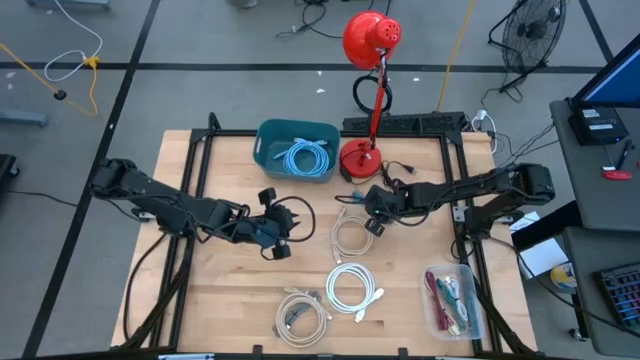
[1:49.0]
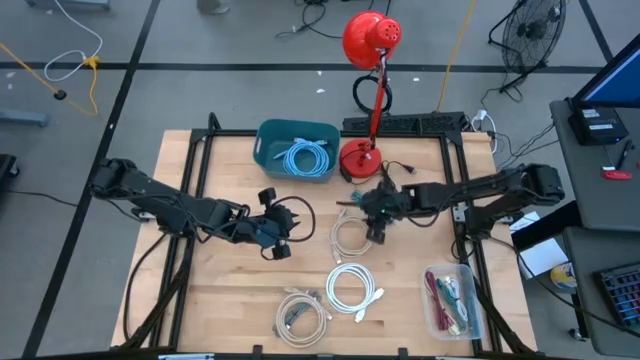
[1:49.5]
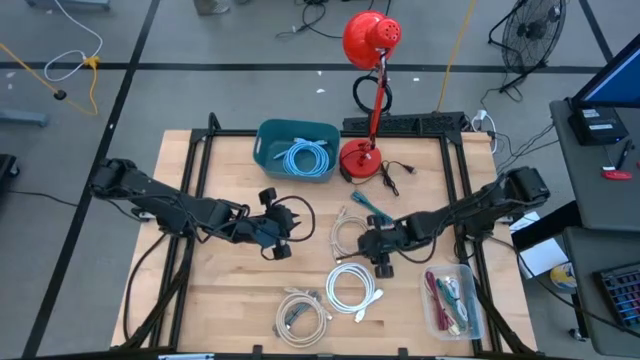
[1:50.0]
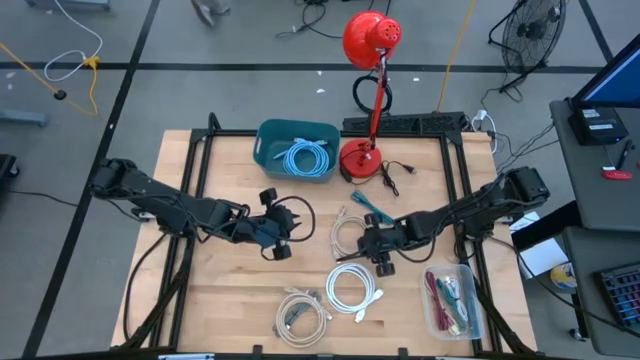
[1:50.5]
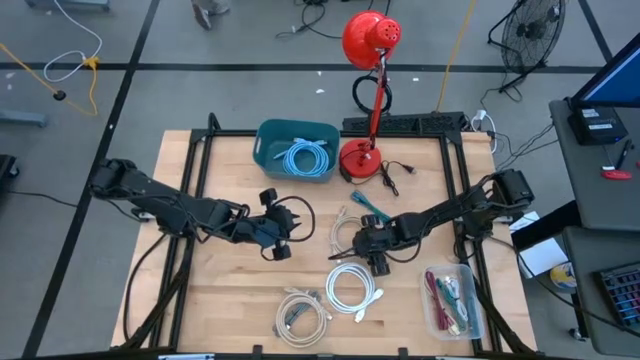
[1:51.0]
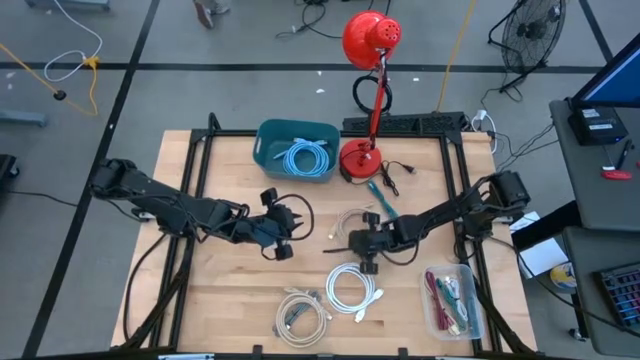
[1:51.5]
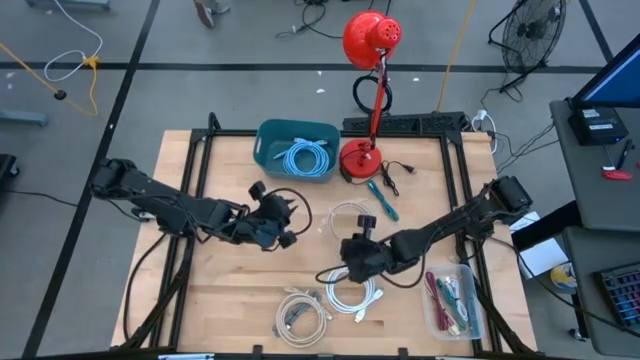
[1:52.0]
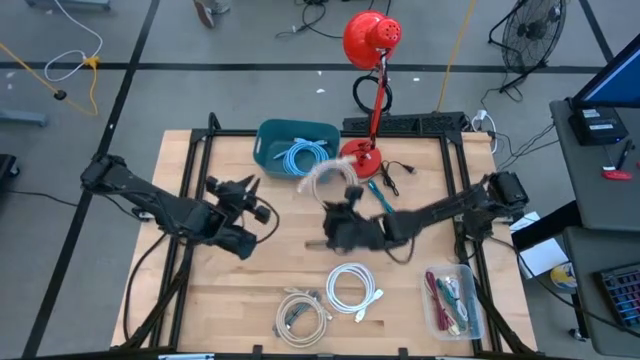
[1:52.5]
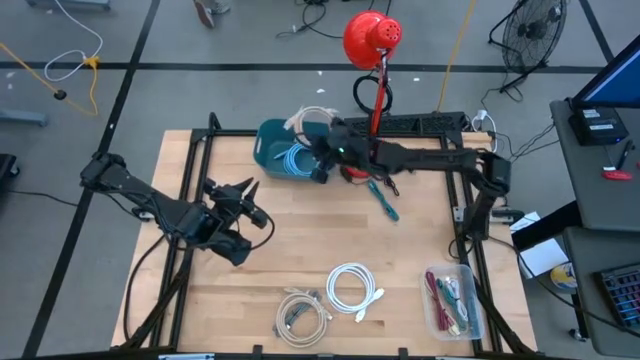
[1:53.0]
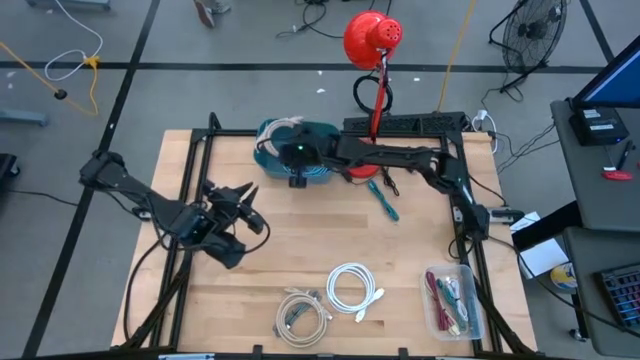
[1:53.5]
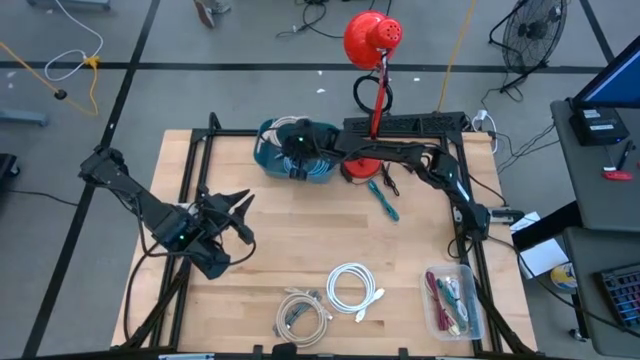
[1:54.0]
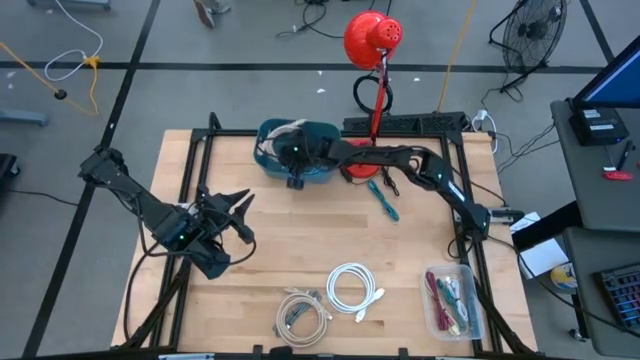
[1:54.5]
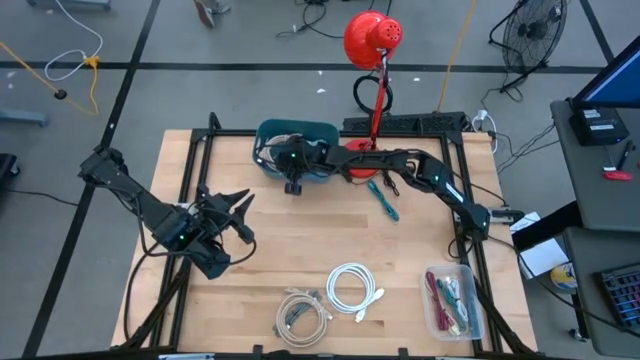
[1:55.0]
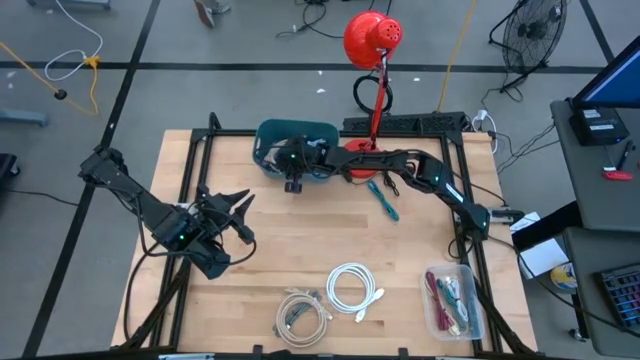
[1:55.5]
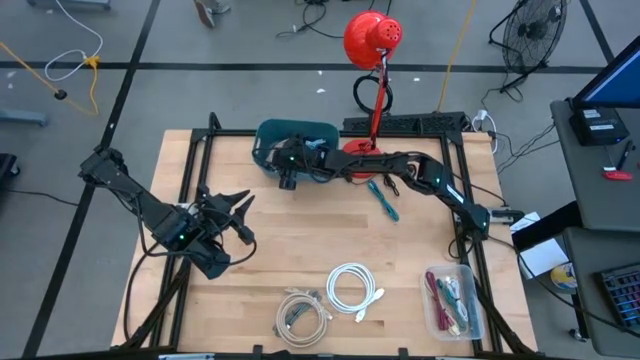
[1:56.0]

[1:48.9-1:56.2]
Task: Pick & Place USB Port
Put the top light brown hdmi cable into the blue bin

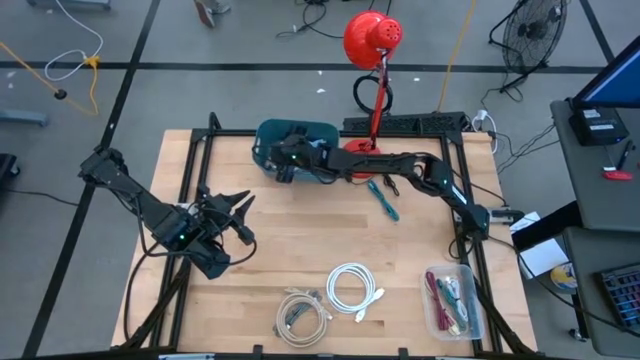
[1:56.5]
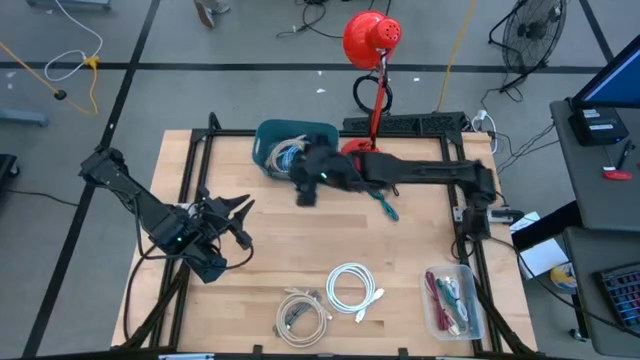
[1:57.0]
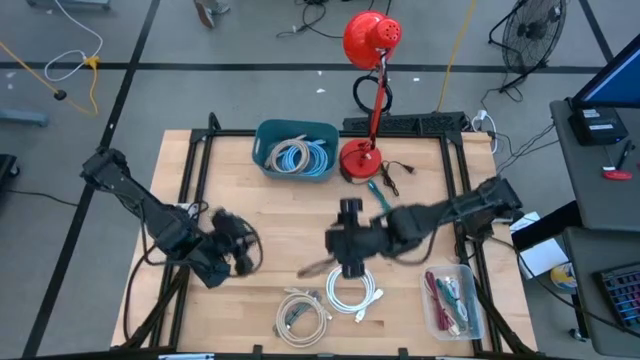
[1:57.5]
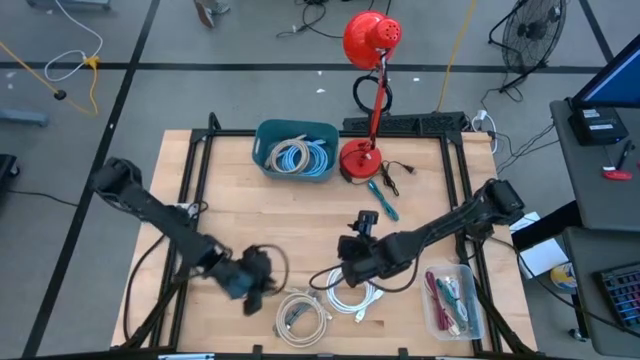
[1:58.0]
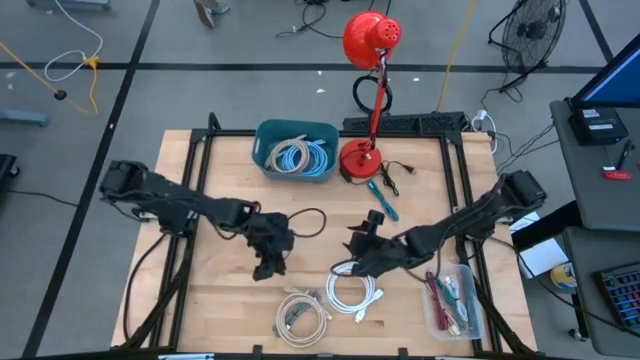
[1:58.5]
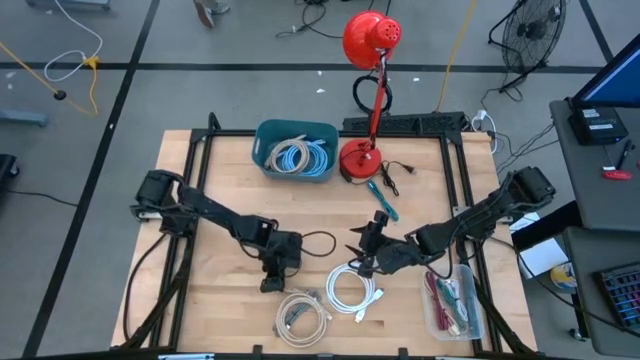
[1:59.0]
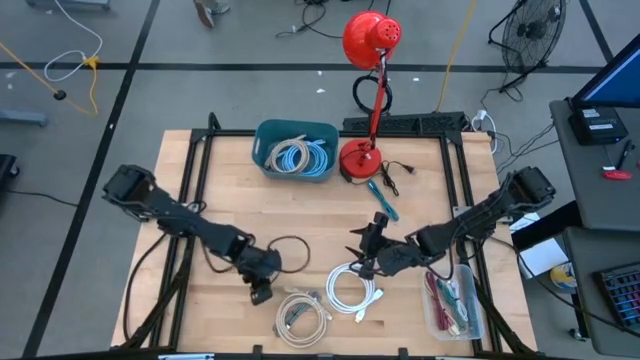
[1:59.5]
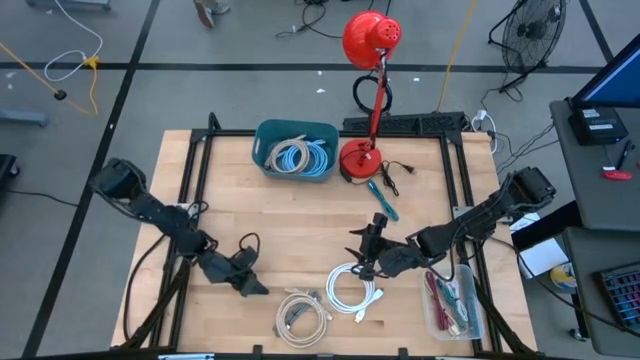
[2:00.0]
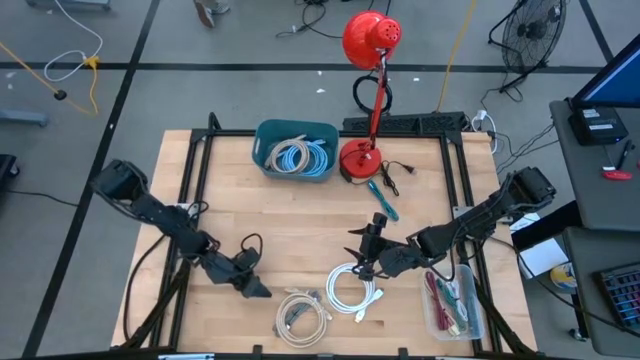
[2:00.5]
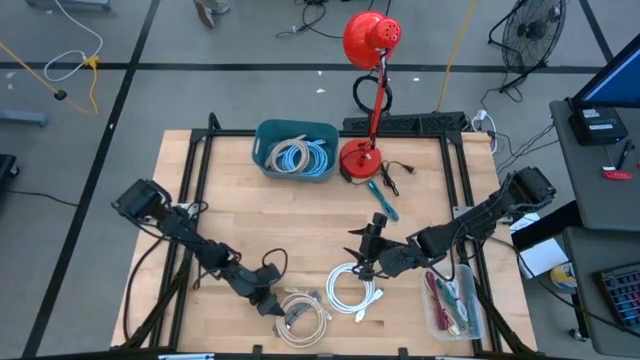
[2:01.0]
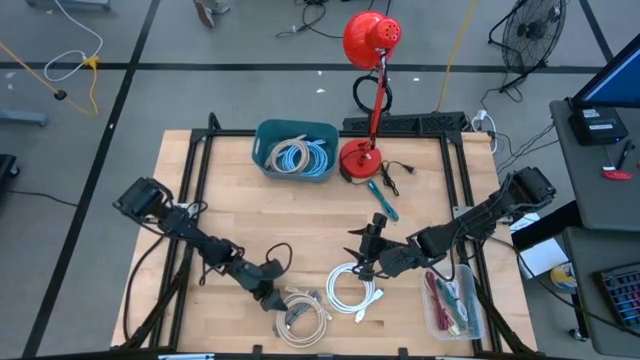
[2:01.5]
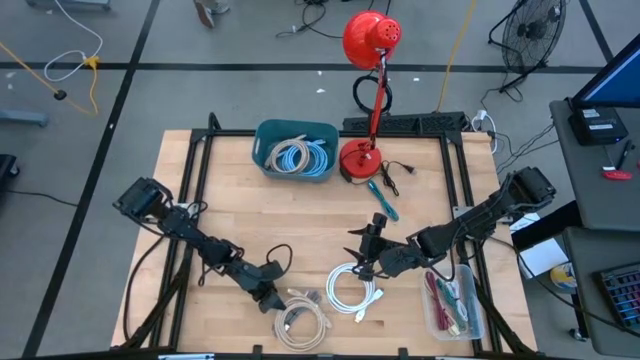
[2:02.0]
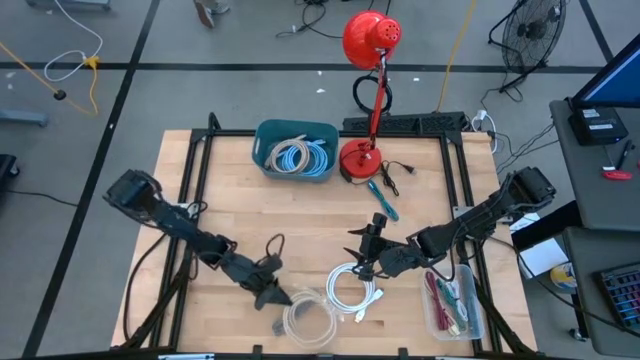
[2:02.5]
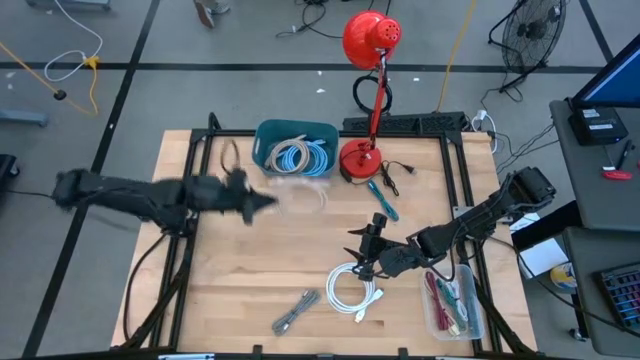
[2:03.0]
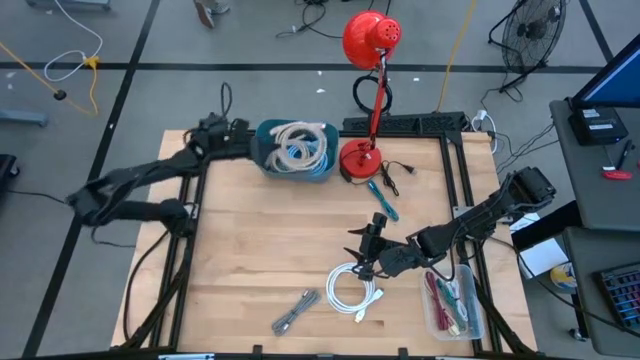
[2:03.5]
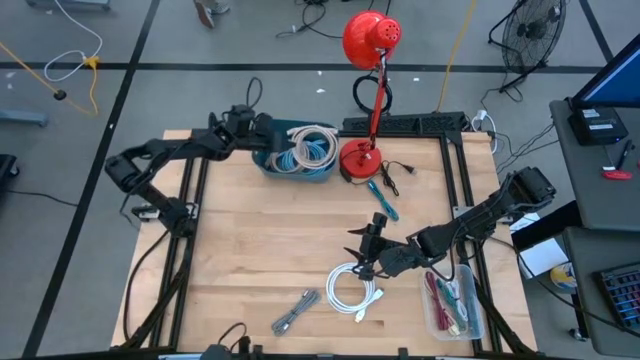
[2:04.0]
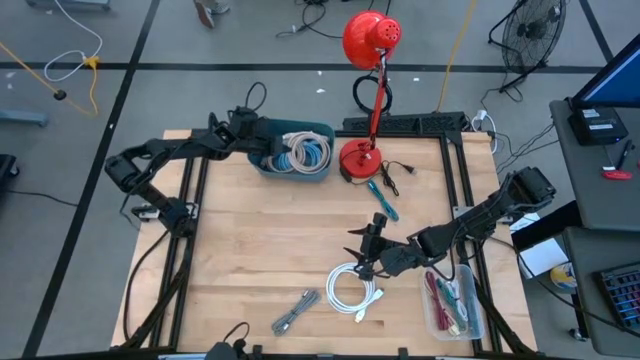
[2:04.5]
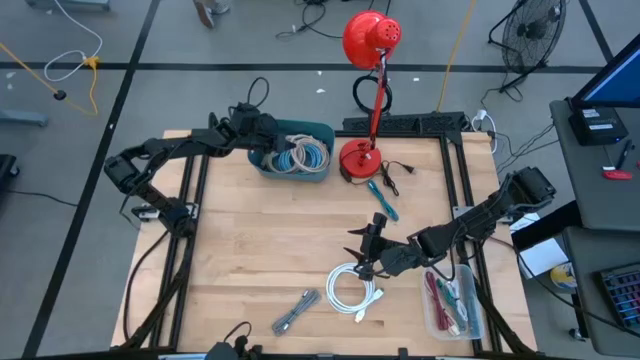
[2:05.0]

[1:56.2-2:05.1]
Put the light brown hdmi cable into the blue bin

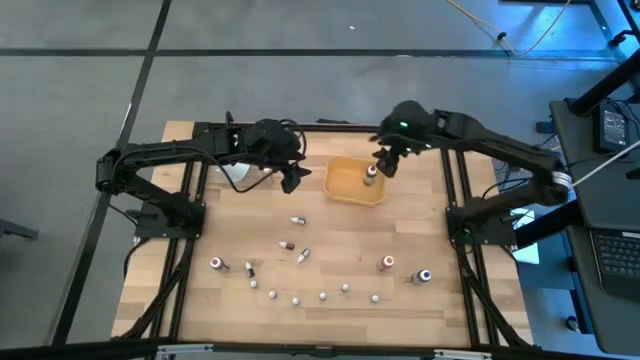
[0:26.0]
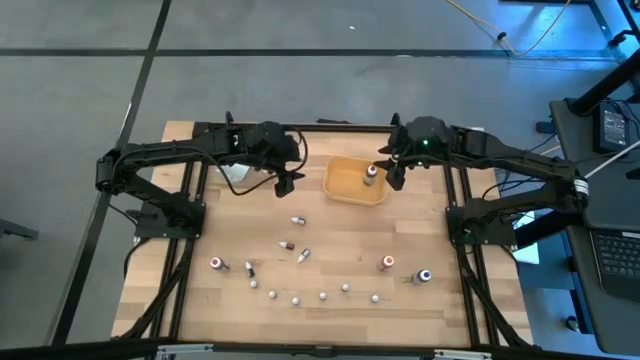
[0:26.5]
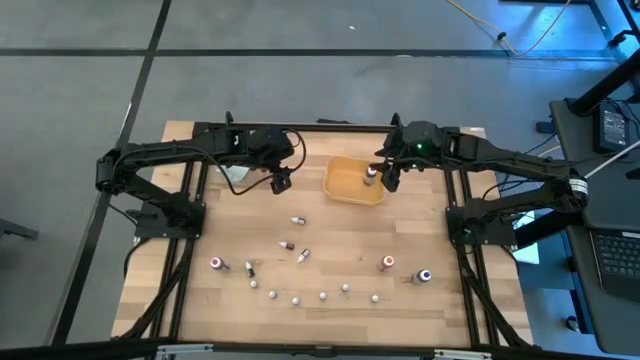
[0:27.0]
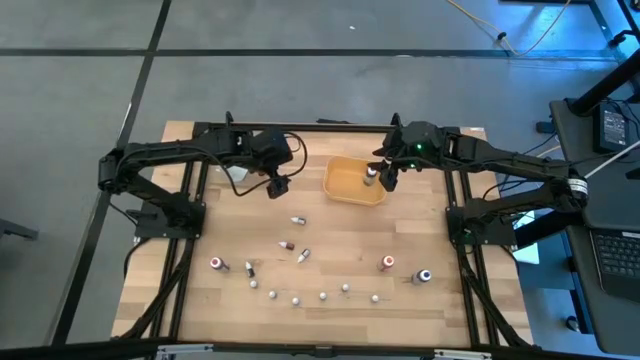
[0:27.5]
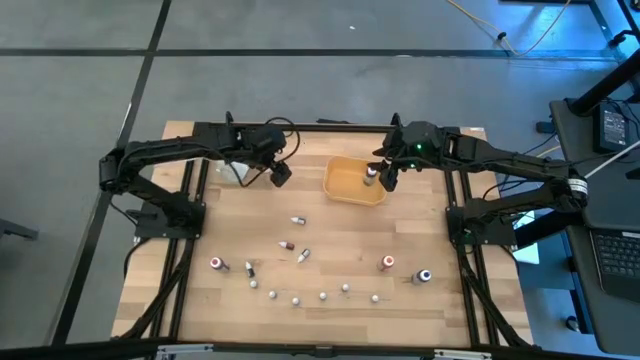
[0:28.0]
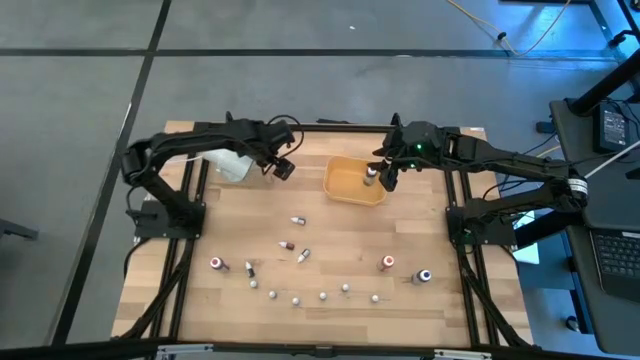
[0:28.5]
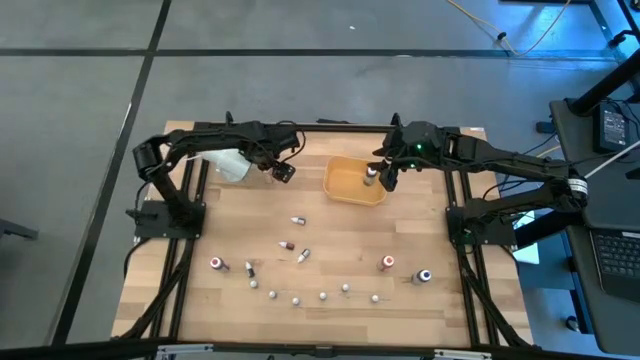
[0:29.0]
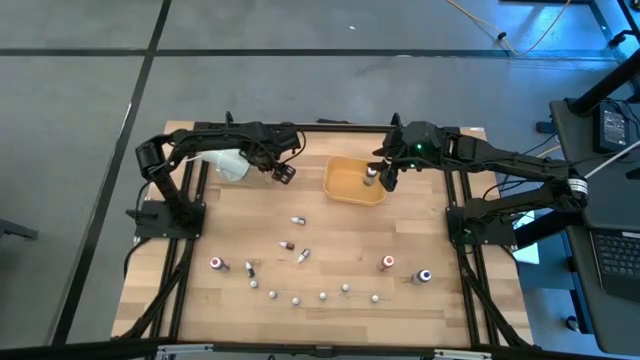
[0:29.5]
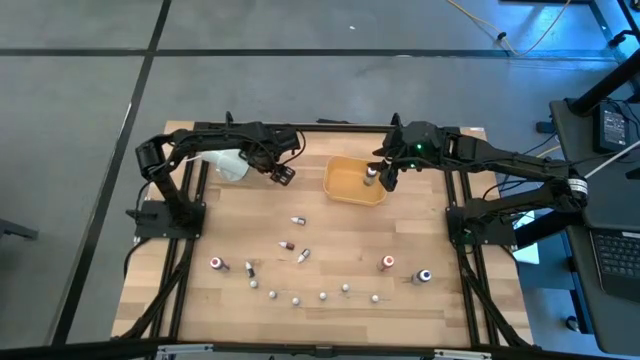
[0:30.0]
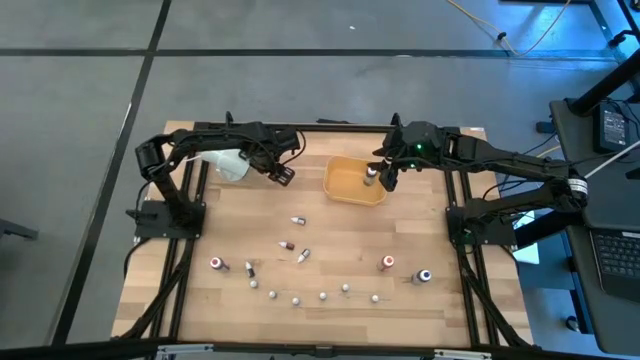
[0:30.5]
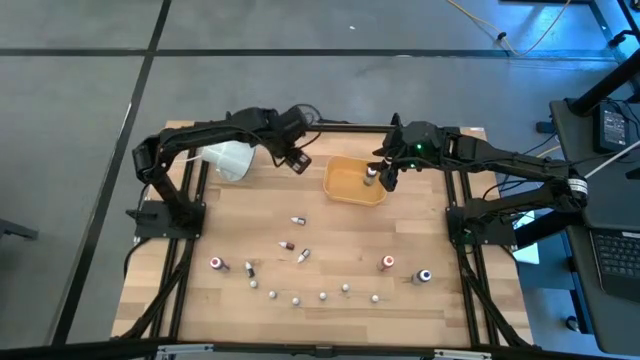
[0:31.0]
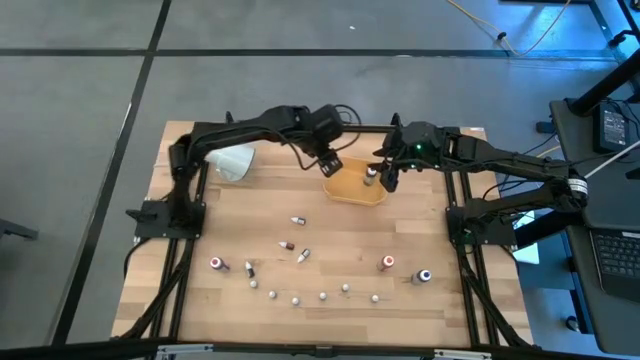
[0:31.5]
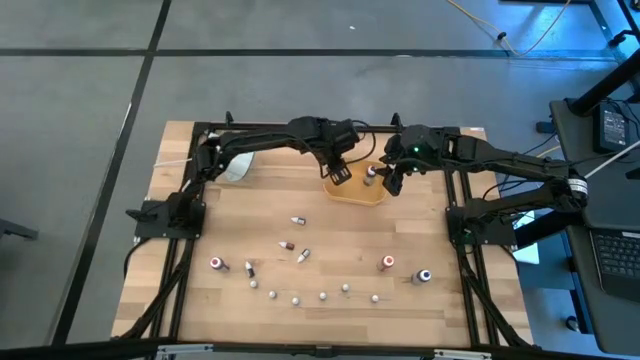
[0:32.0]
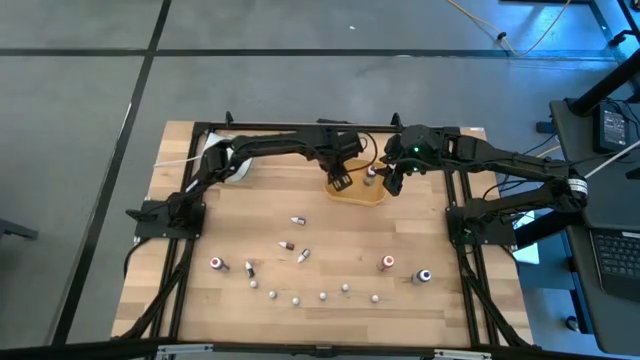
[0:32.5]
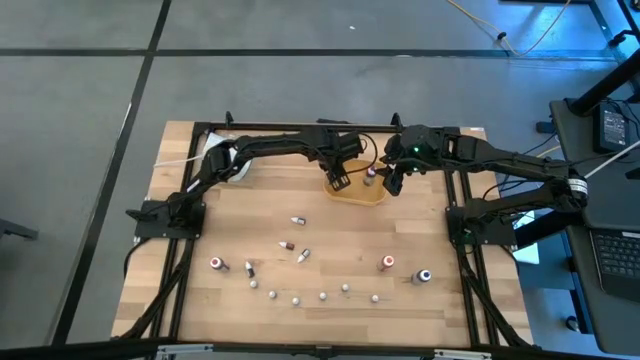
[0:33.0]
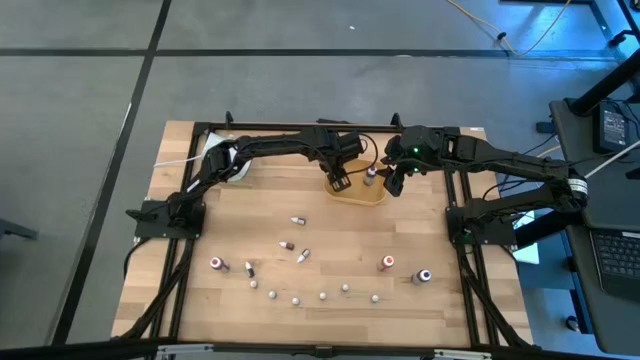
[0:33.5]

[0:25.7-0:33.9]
Task: Pick & Place food coloring
Put the large yellow food coloring bottles into the yellow bin
